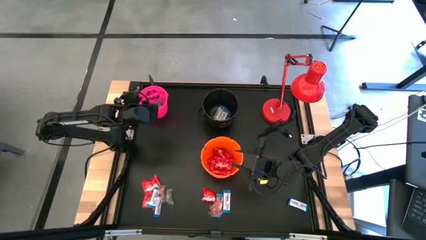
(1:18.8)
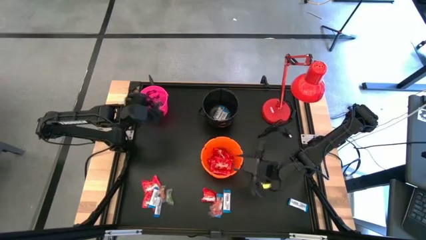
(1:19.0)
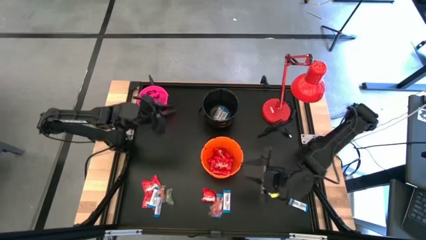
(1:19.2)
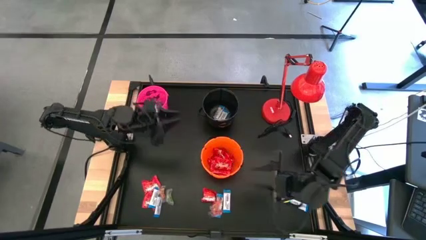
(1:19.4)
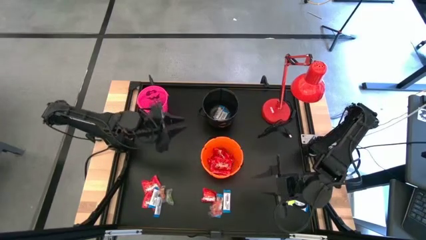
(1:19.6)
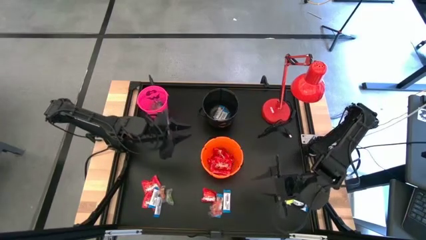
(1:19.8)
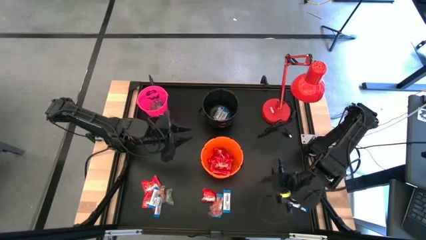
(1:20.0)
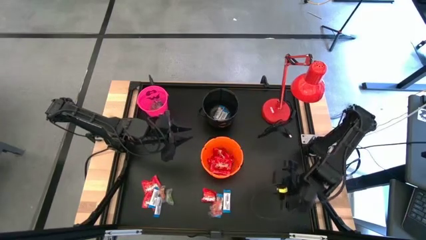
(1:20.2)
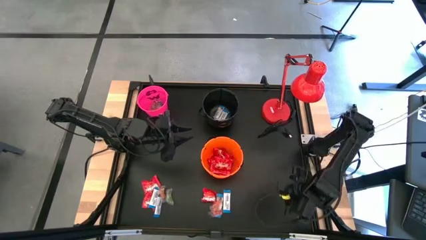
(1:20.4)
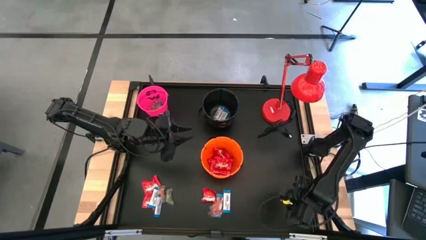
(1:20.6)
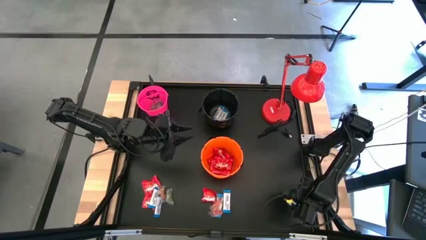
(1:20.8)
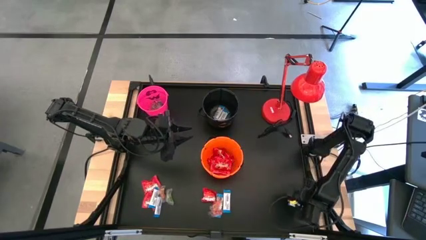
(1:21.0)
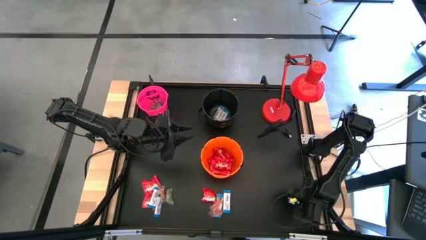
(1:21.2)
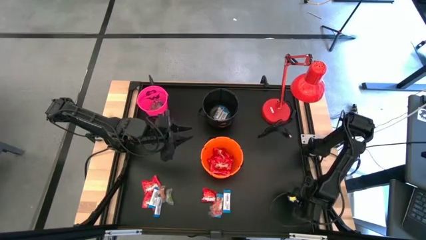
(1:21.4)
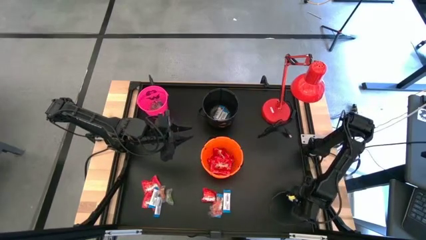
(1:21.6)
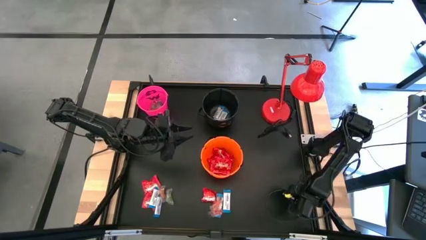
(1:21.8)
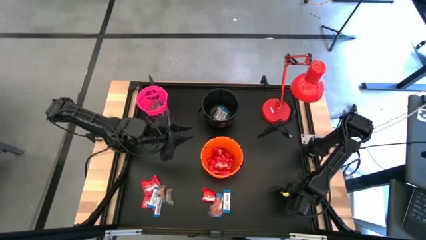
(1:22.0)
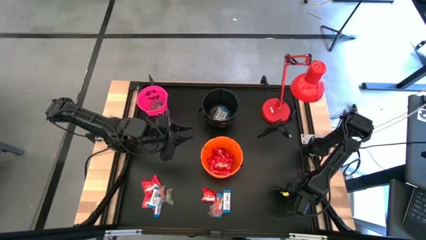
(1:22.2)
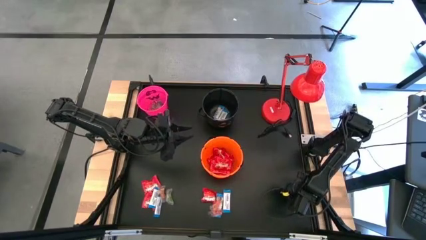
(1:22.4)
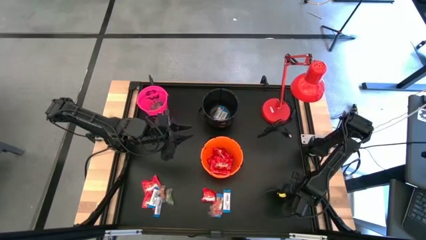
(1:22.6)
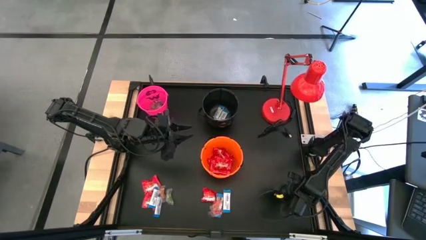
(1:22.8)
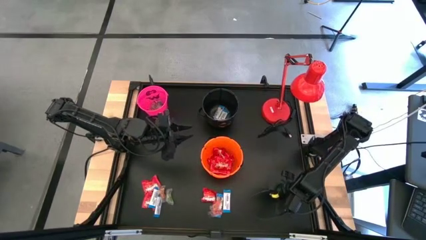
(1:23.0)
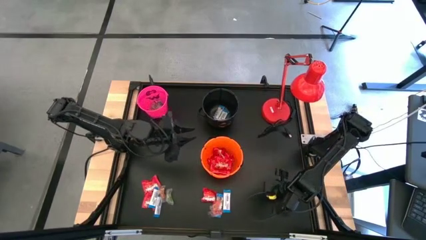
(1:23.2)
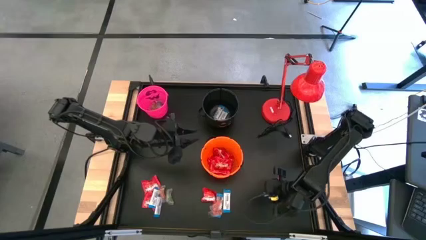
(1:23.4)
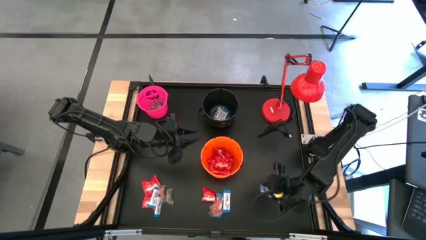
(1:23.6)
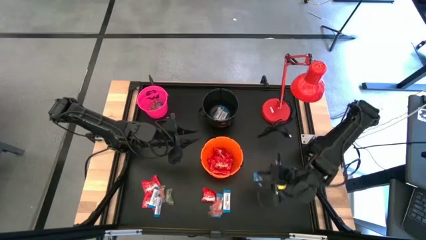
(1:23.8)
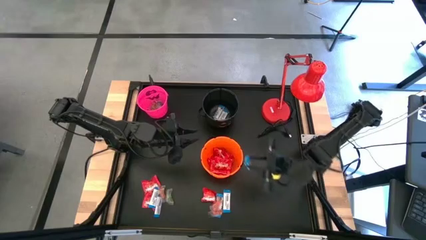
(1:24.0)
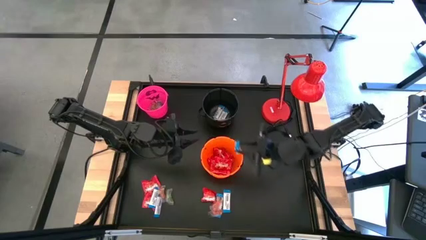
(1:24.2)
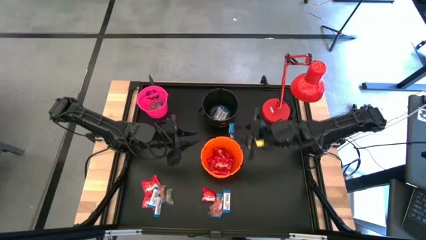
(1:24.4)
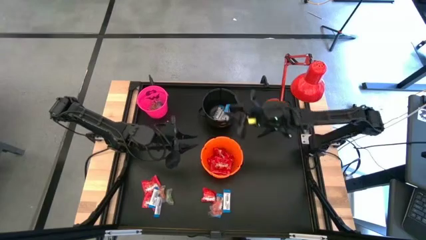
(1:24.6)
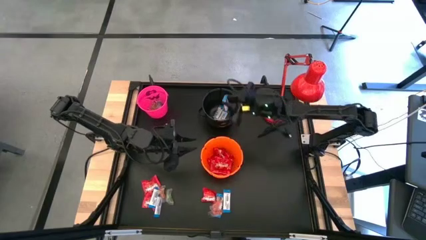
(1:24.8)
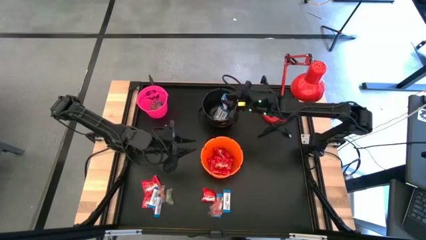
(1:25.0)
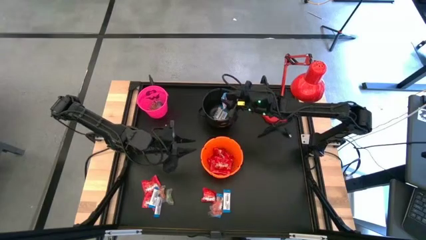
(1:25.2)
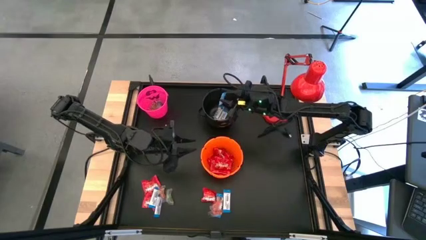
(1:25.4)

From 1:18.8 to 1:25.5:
Task: Sort candy
Put the white chocolate into the black bucket

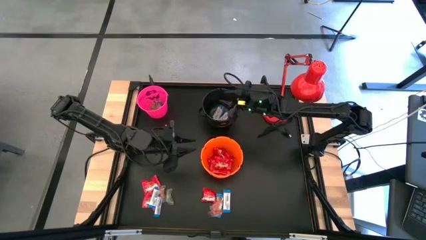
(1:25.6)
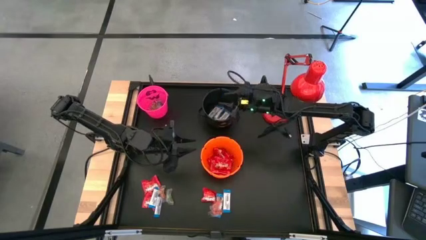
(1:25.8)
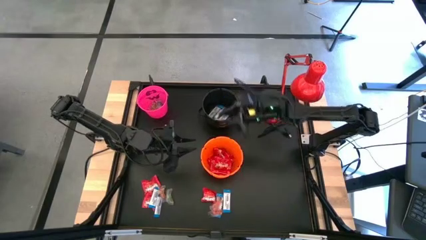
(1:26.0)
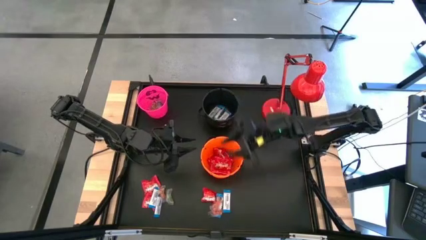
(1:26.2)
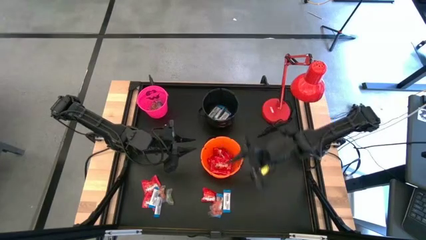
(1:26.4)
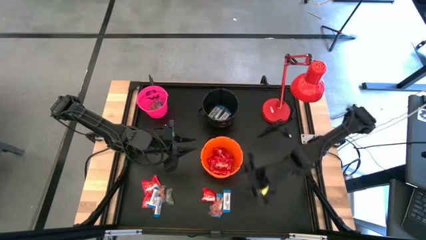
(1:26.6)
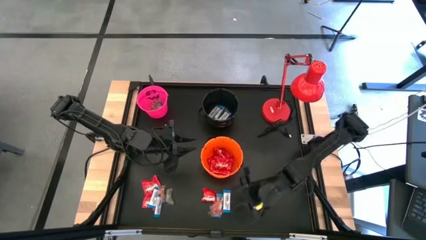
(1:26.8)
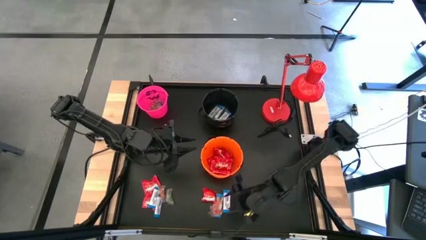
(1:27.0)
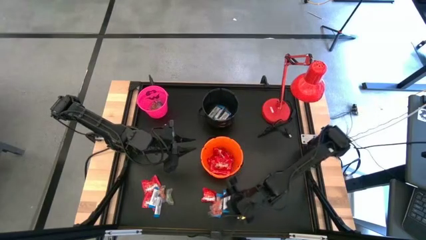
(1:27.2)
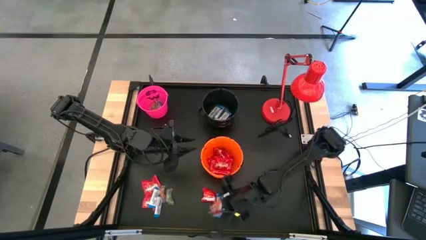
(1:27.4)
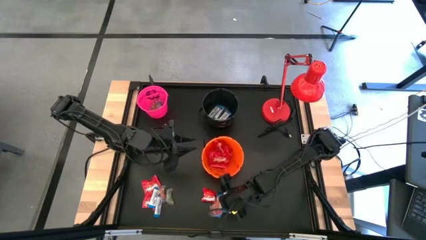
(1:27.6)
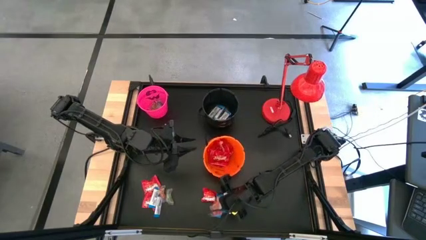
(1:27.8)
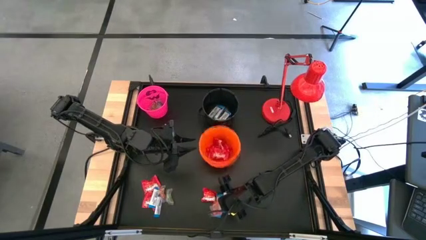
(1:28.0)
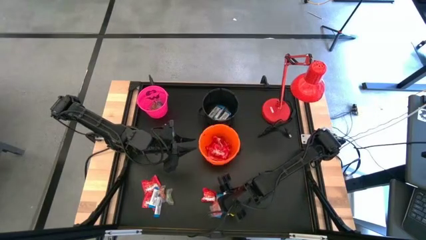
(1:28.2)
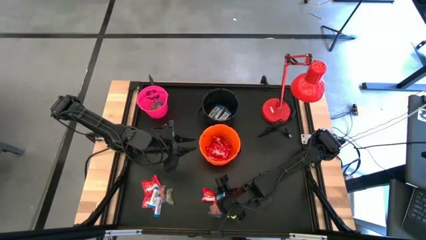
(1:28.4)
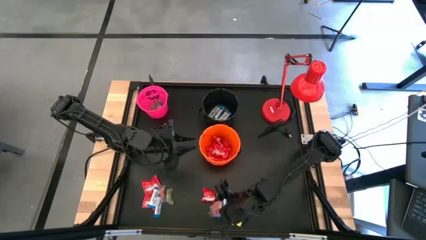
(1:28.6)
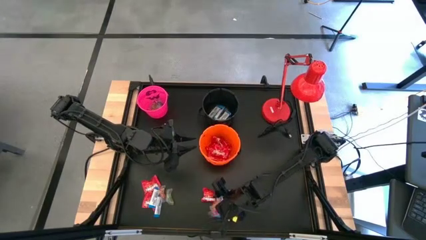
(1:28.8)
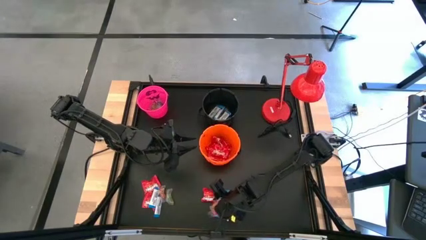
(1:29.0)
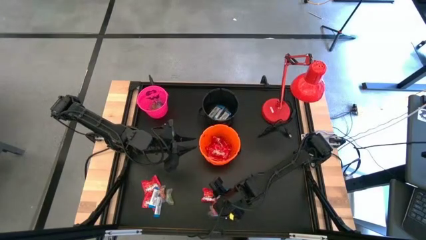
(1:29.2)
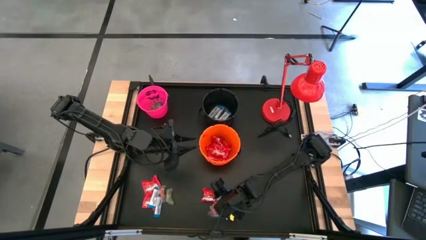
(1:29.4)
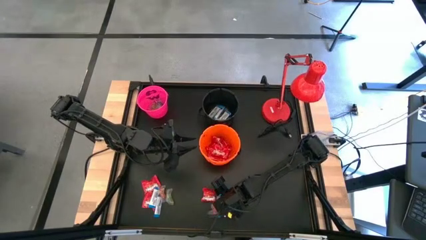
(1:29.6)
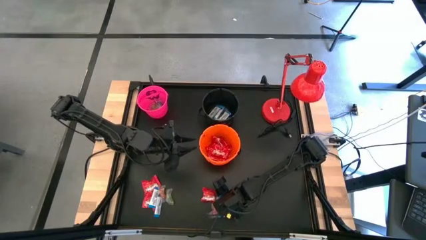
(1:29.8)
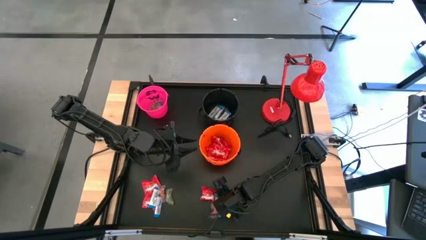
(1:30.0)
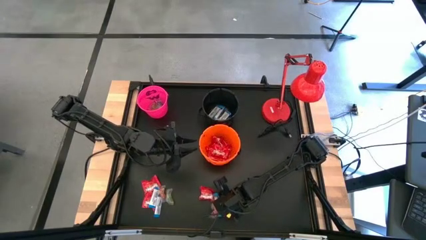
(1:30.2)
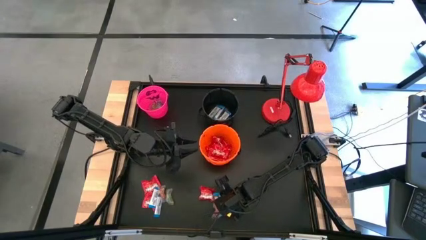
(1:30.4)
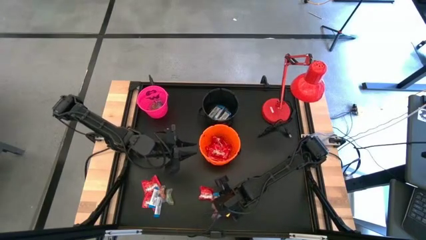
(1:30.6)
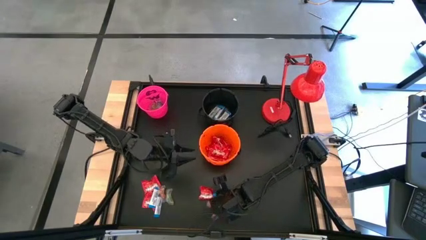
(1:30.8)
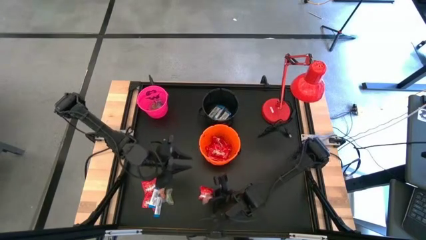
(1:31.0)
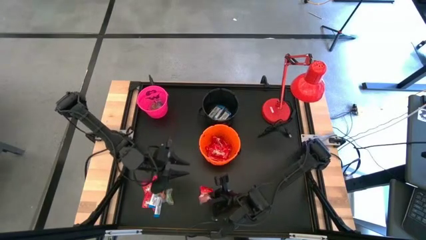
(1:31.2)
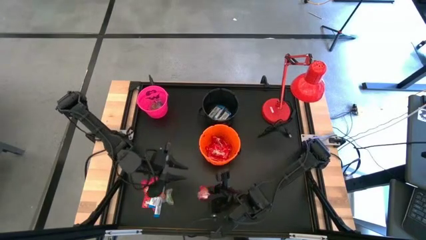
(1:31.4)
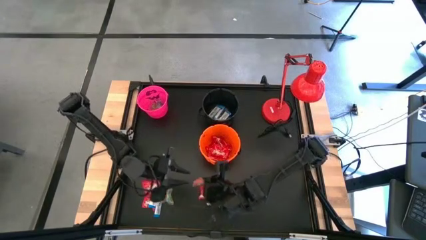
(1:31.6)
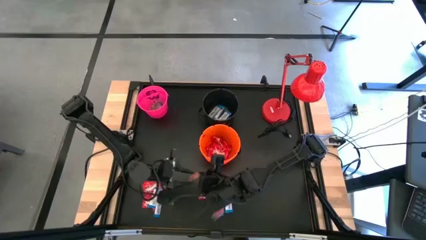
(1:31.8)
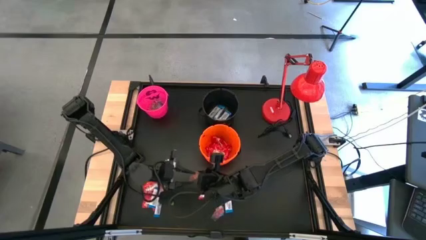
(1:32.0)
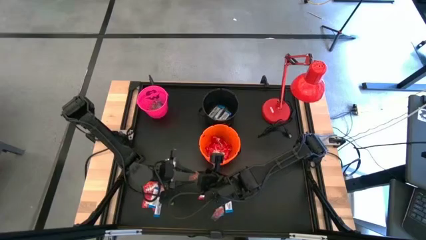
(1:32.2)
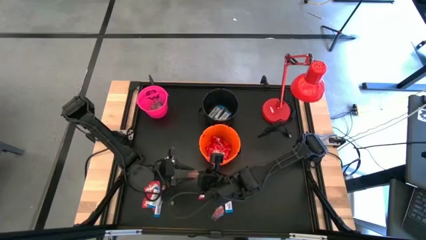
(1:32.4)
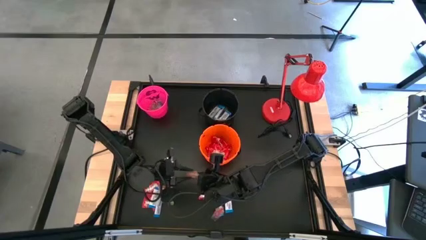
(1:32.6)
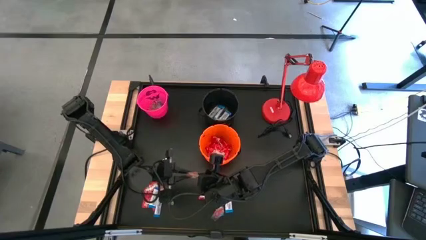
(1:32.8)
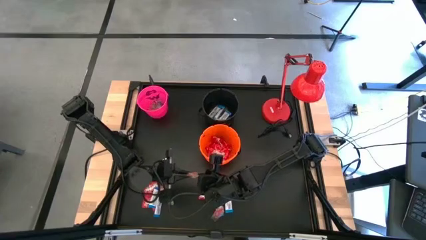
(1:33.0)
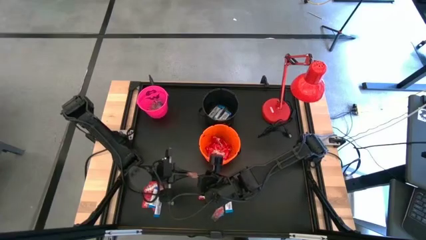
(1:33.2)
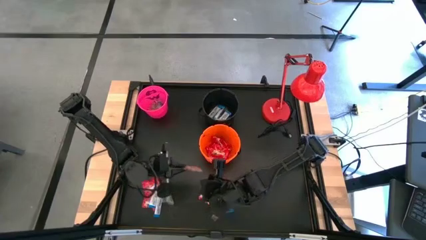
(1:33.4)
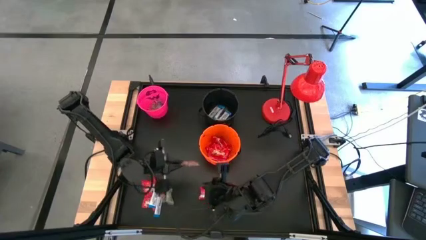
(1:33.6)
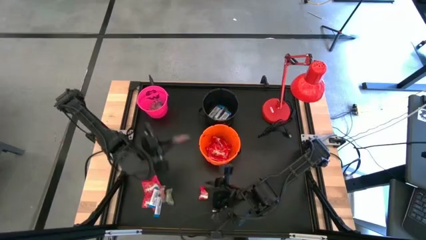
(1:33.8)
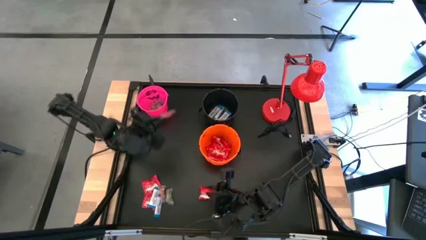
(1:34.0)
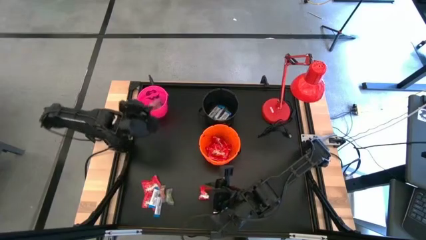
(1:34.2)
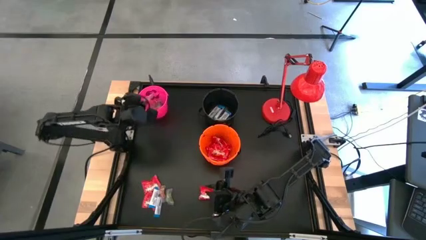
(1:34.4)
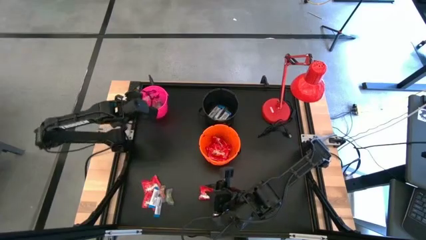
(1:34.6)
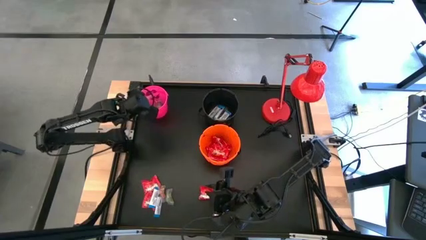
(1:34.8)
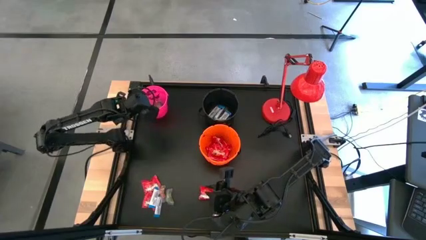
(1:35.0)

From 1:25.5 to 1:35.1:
Put the orange gummy into the pink bucket
